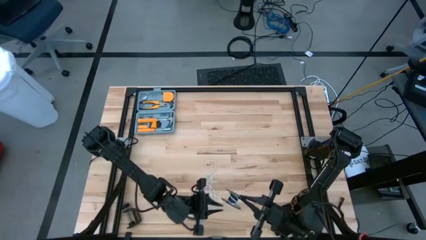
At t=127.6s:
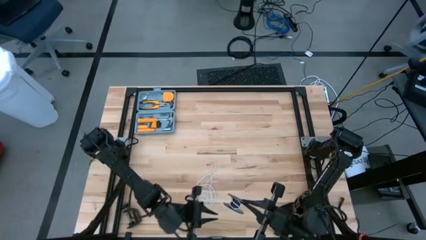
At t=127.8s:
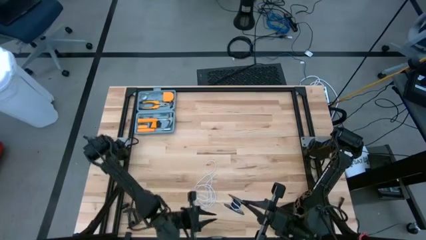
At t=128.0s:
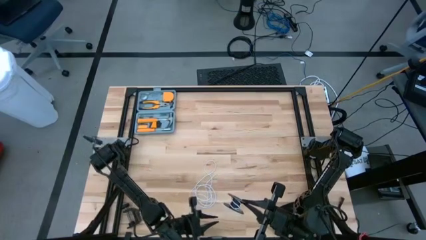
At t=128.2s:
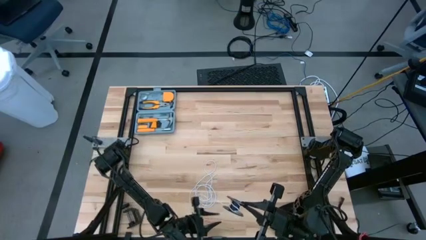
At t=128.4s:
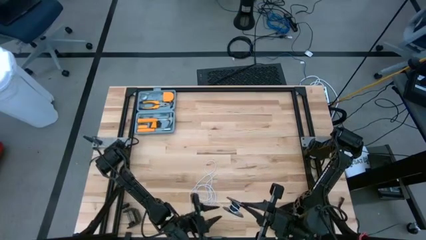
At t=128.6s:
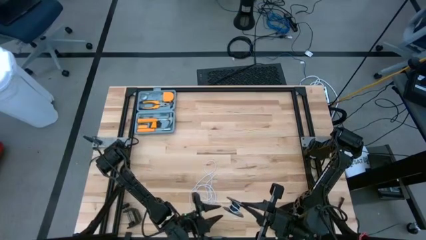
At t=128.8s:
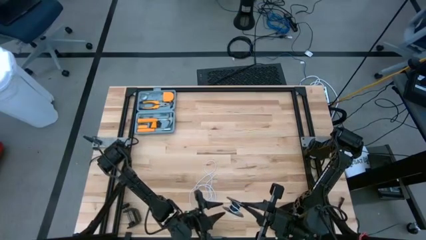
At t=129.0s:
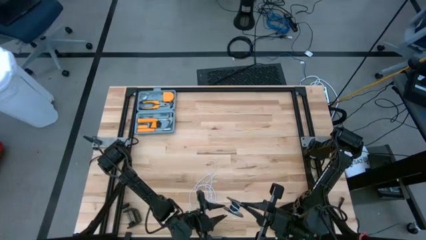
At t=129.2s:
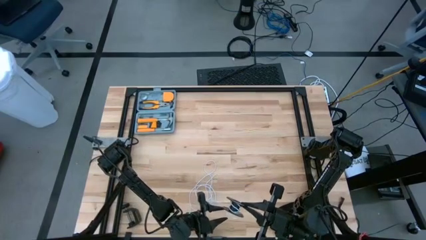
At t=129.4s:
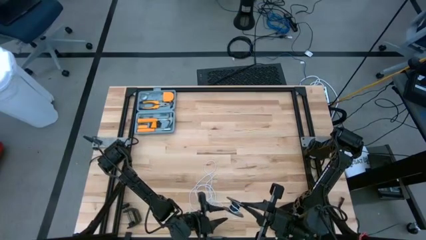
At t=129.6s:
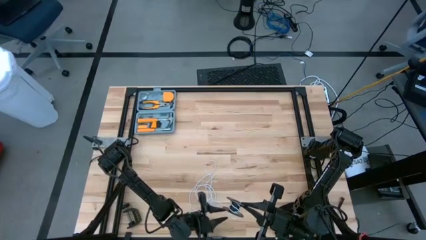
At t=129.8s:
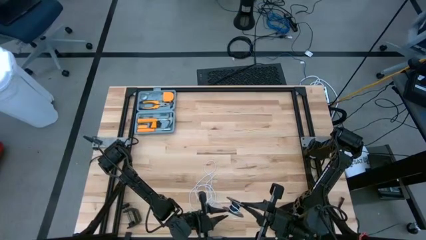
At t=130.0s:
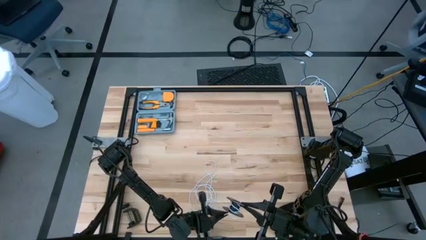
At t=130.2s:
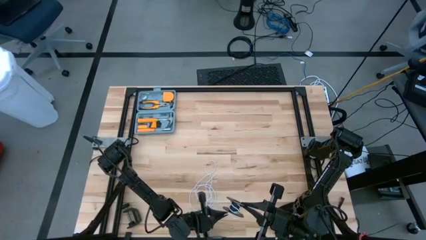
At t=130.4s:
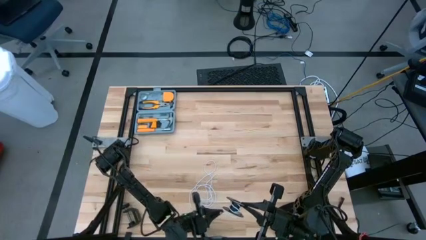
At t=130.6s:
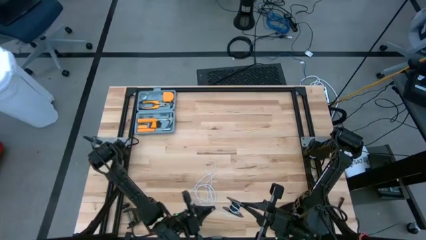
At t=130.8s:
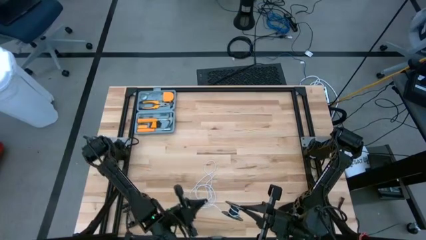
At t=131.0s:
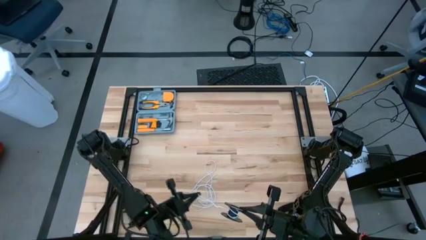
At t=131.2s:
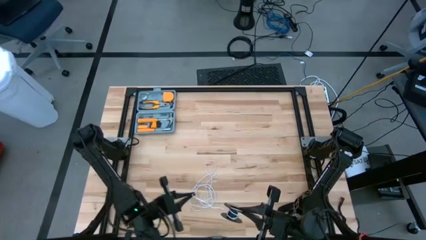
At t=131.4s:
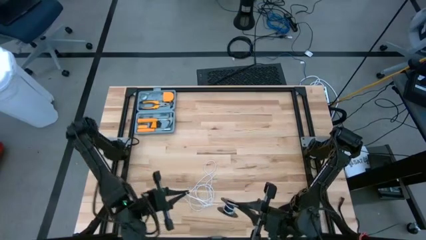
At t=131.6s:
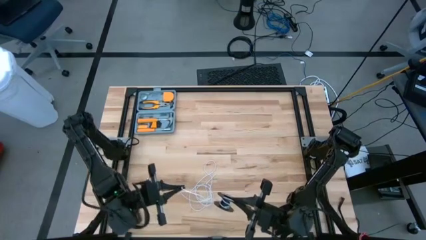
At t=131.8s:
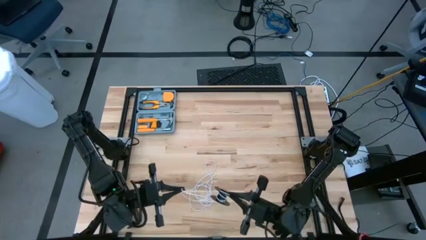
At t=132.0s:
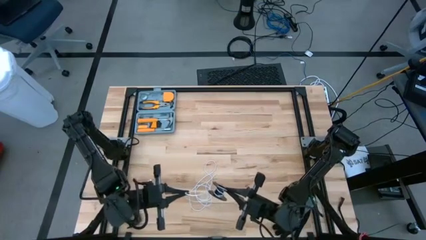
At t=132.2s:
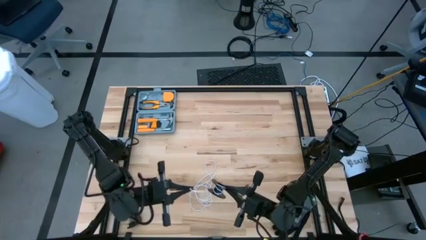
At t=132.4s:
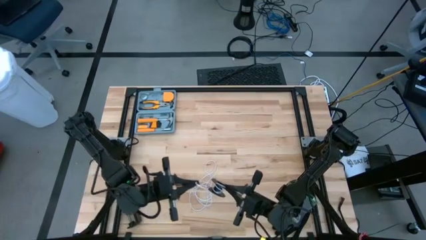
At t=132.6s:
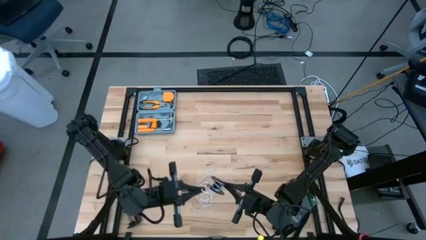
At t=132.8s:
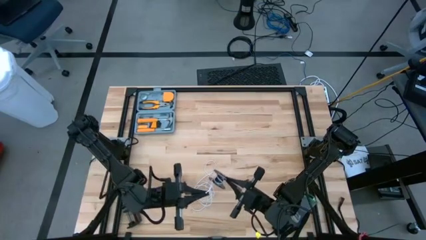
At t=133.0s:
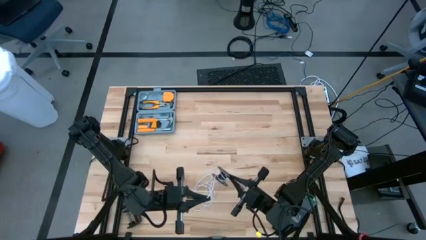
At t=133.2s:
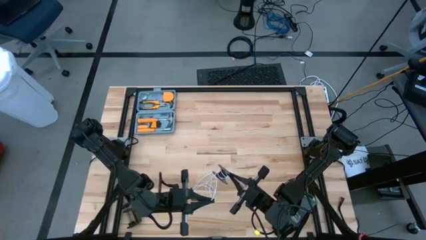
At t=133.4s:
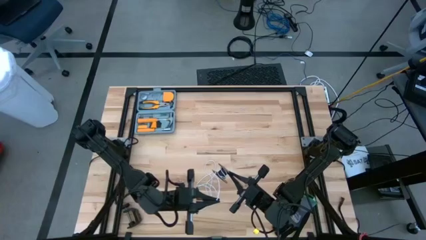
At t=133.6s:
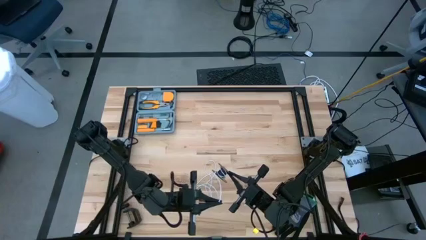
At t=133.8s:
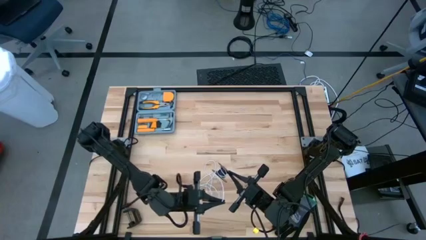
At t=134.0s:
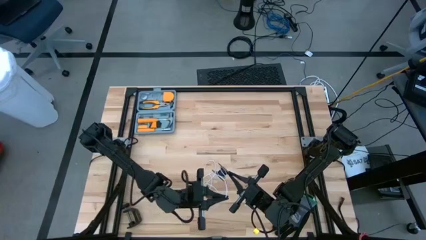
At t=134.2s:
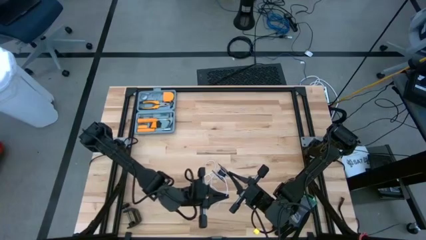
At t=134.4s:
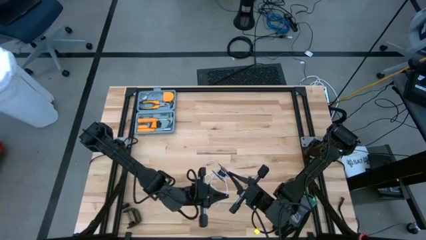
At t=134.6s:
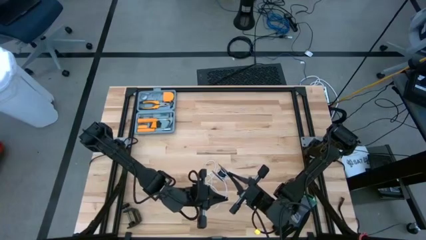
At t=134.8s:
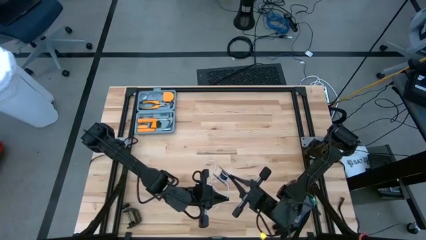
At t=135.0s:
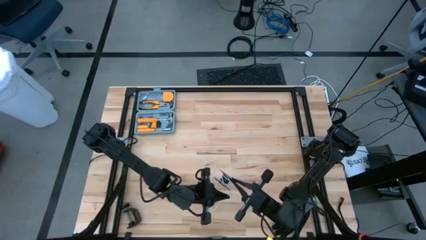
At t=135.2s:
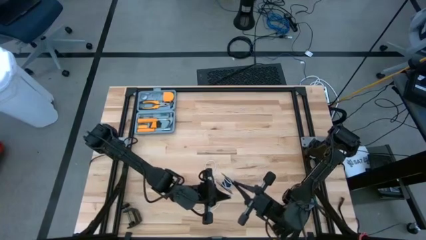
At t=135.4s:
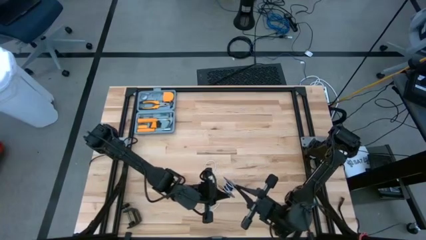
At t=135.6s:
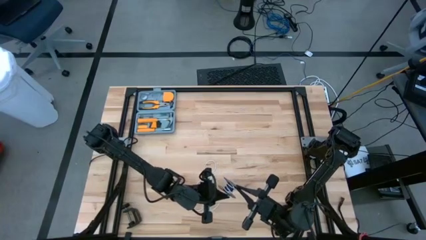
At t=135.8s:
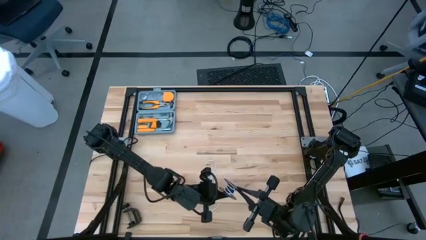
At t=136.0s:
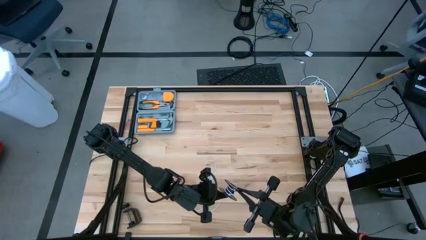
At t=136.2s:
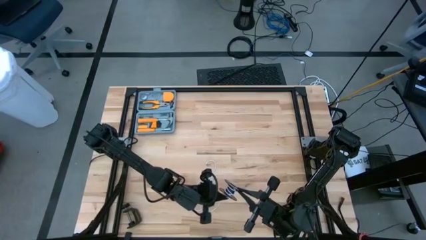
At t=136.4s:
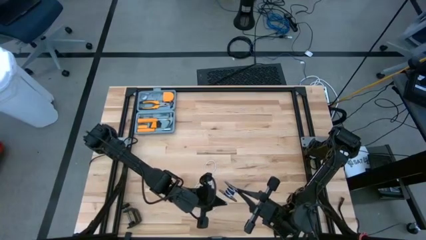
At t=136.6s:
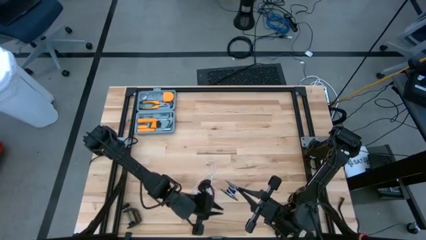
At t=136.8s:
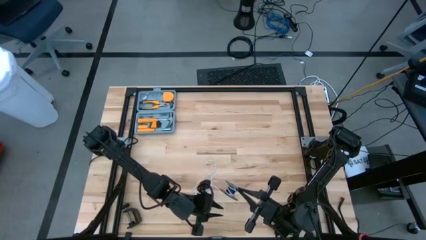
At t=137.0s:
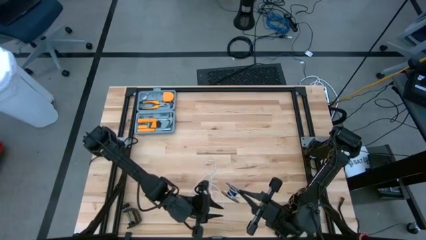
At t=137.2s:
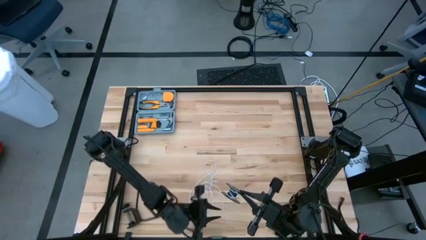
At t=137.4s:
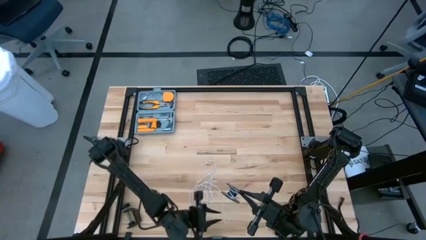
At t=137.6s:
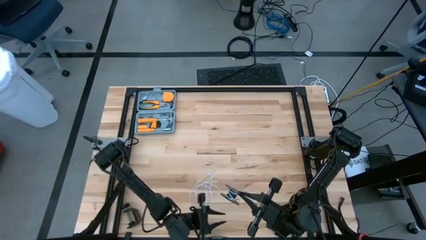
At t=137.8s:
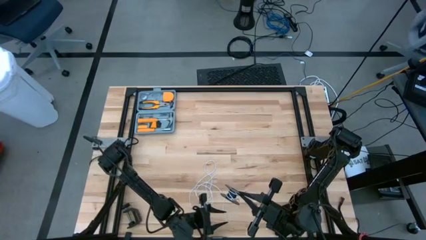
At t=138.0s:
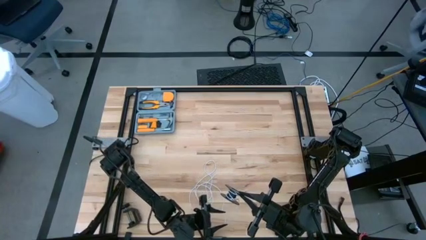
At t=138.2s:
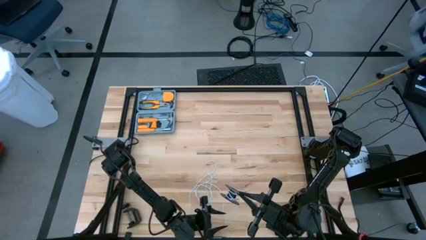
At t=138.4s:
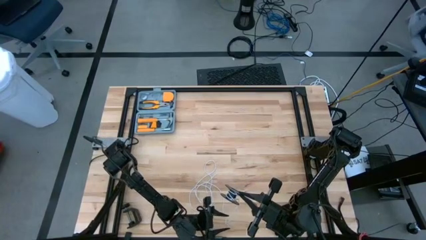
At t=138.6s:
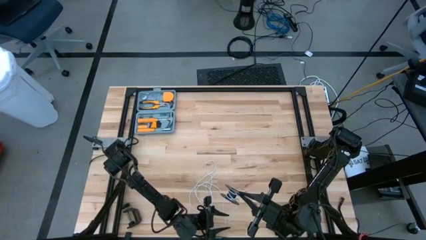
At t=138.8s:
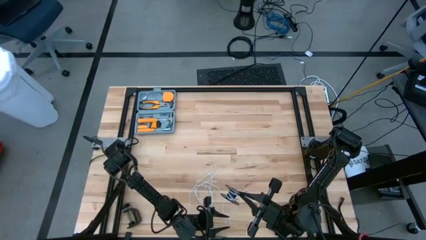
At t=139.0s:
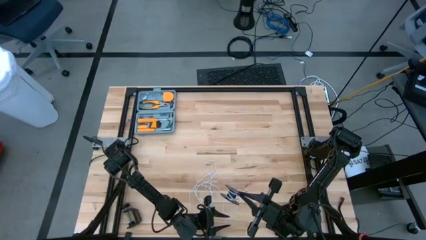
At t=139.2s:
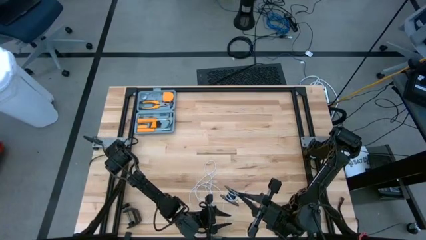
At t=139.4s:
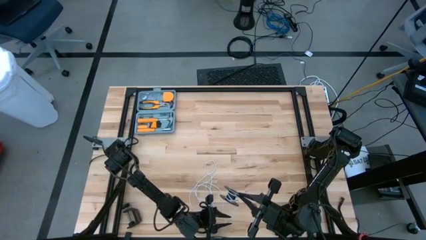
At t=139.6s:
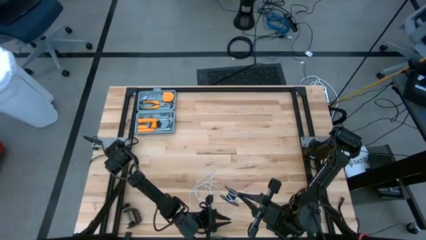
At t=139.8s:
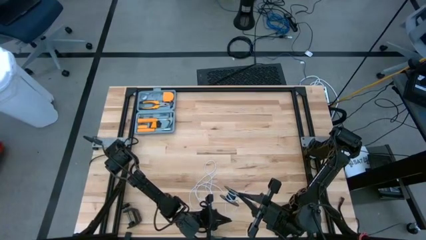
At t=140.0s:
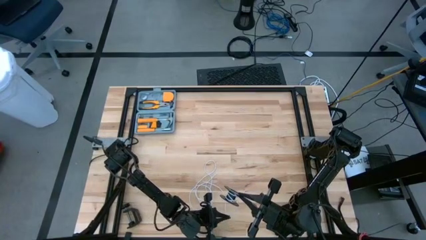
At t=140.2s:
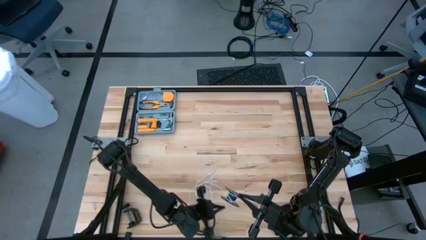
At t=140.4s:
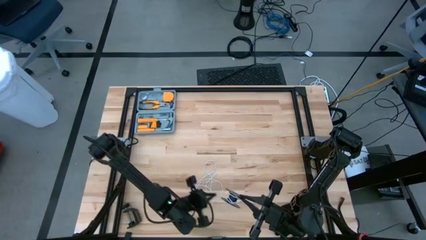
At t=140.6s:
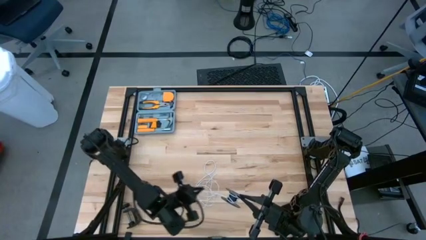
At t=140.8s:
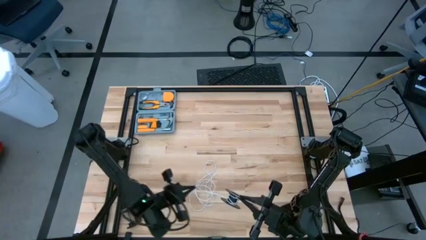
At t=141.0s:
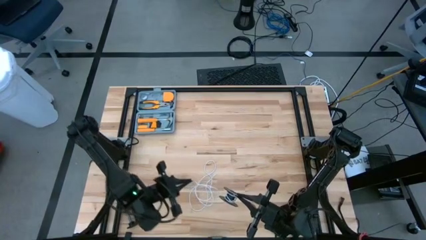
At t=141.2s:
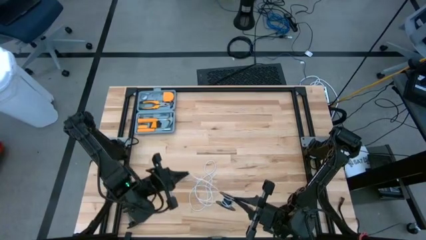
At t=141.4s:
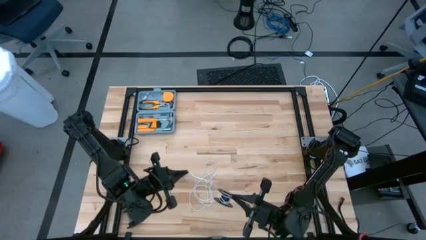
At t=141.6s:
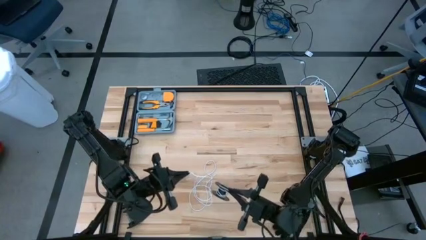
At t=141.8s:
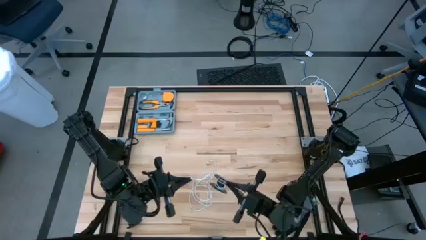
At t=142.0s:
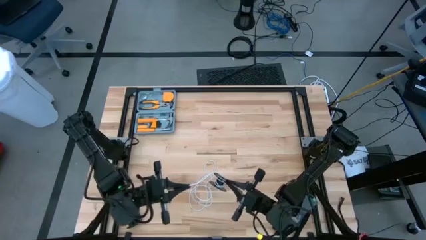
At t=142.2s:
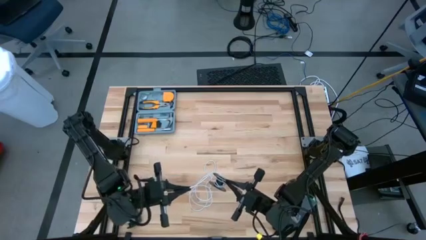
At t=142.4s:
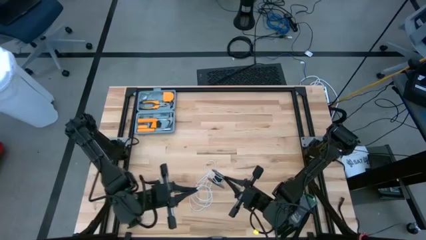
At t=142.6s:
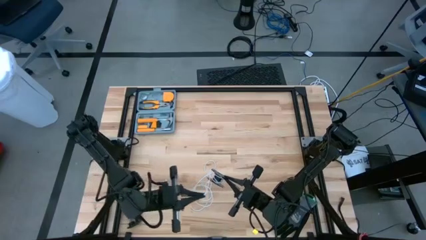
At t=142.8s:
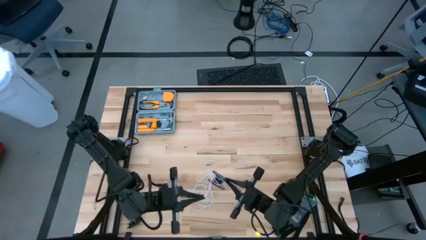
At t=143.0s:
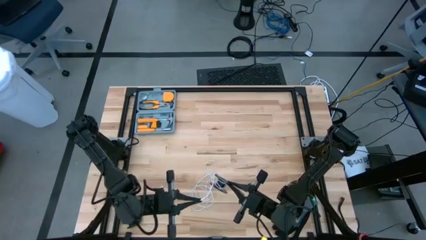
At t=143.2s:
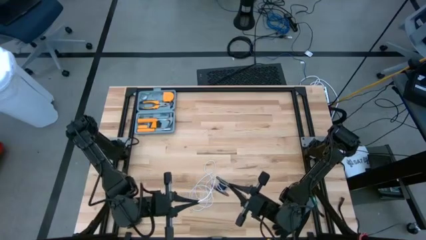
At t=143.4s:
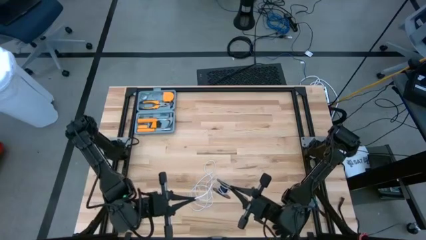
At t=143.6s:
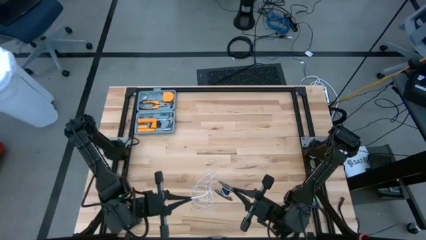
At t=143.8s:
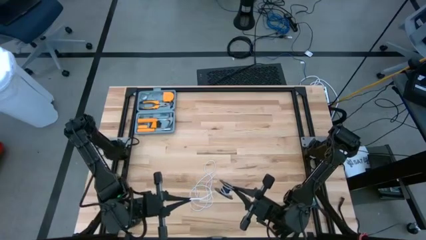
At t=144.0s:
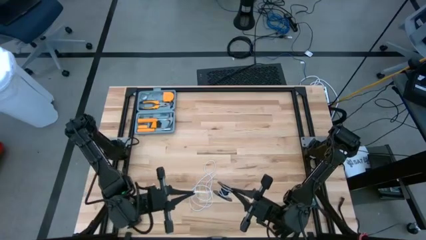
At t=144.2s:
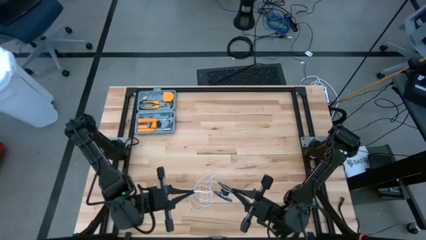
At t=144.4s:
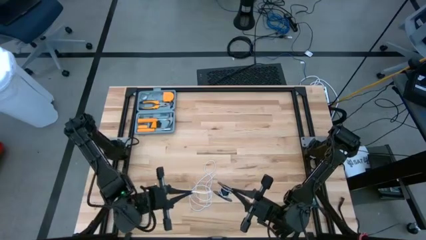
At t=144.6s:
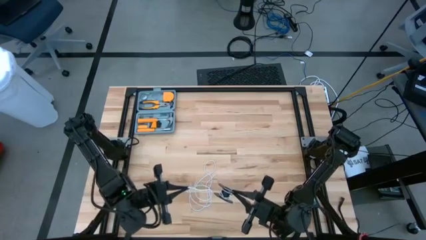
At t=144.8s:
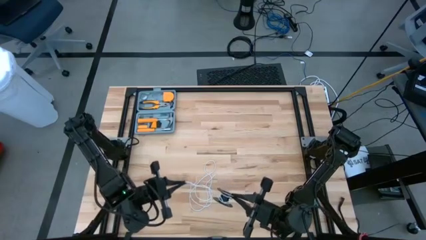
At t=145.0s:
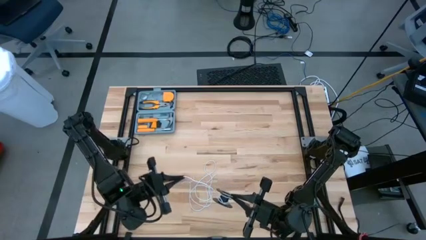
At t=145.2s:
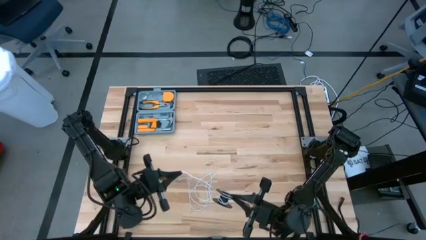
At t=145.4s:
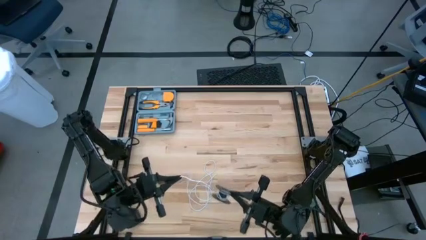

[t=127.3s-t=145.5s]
Task: Coil cords
Coil the white wire on the spool
